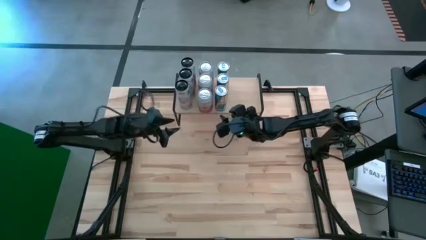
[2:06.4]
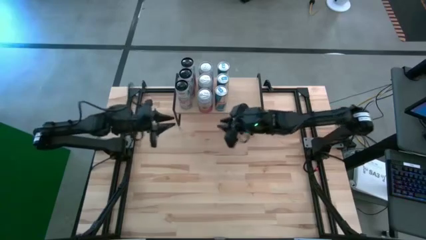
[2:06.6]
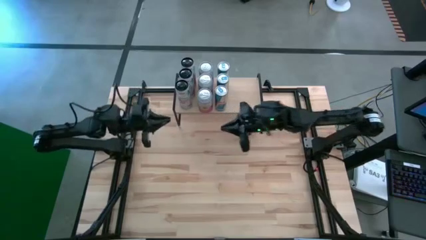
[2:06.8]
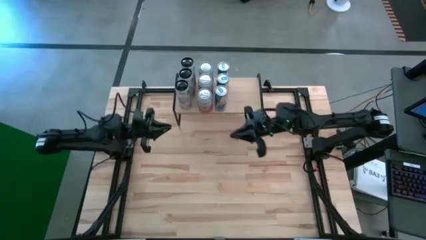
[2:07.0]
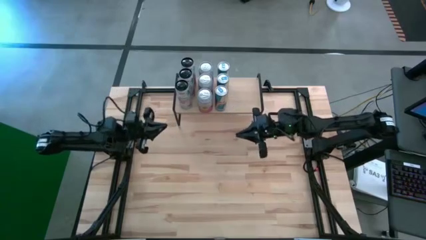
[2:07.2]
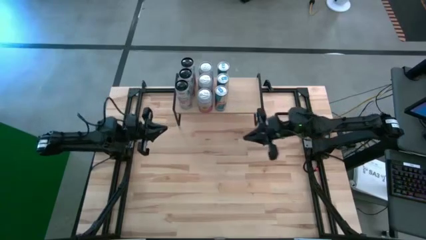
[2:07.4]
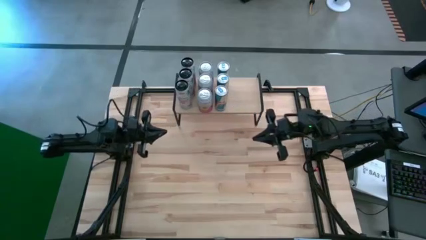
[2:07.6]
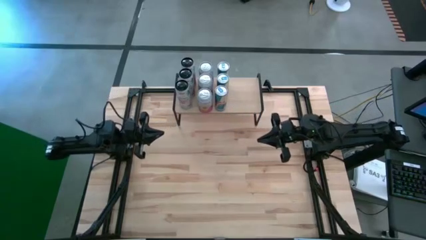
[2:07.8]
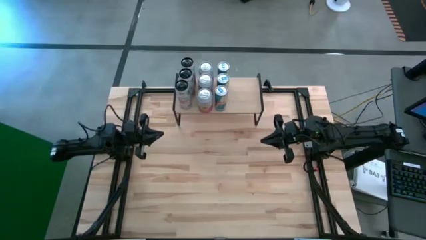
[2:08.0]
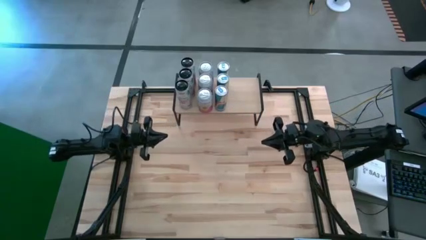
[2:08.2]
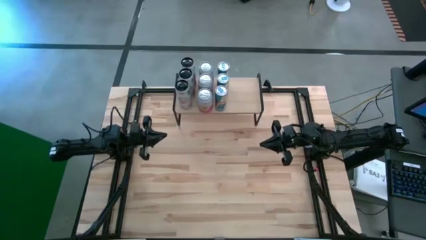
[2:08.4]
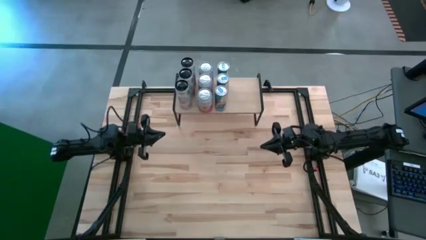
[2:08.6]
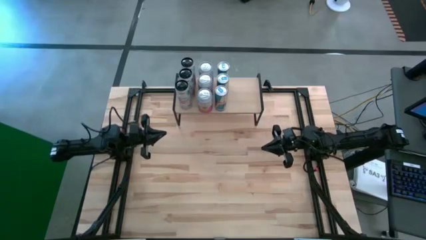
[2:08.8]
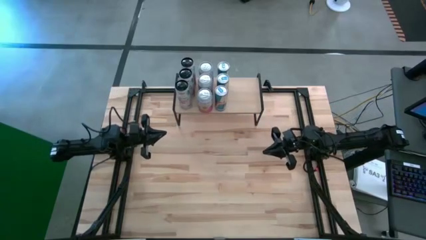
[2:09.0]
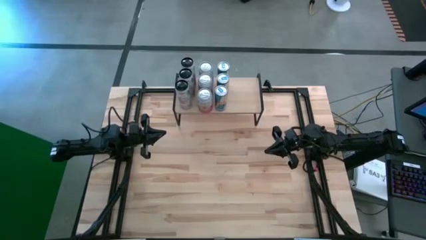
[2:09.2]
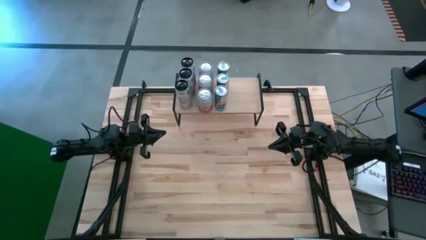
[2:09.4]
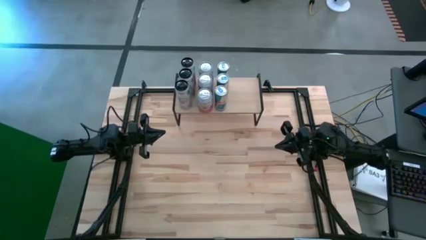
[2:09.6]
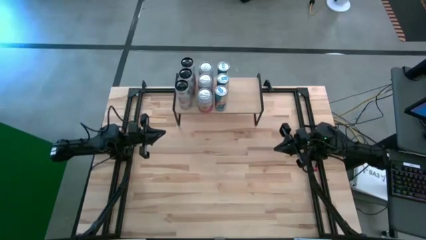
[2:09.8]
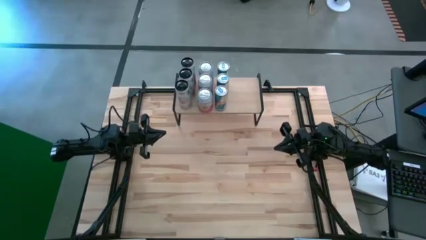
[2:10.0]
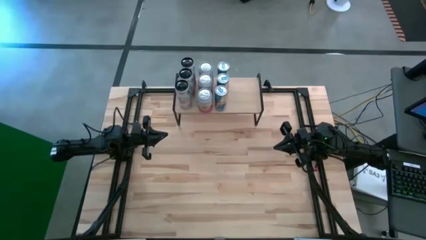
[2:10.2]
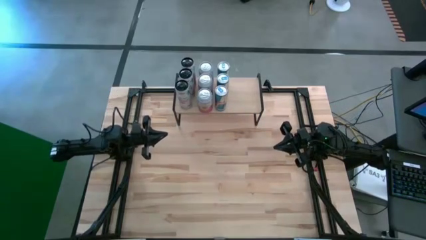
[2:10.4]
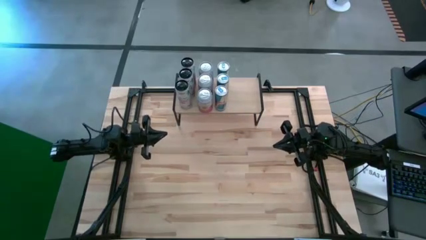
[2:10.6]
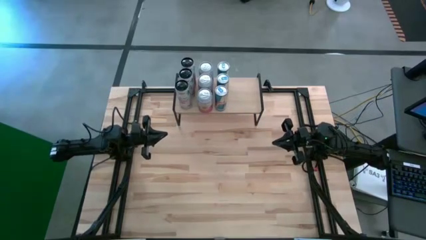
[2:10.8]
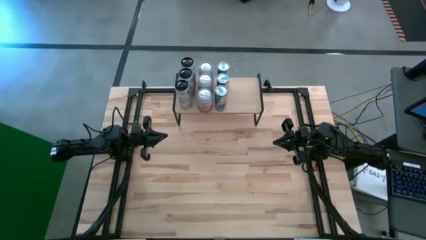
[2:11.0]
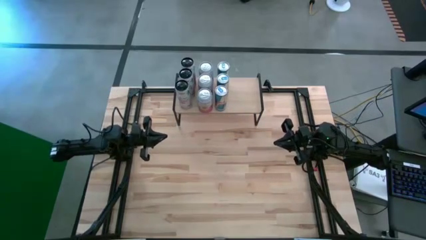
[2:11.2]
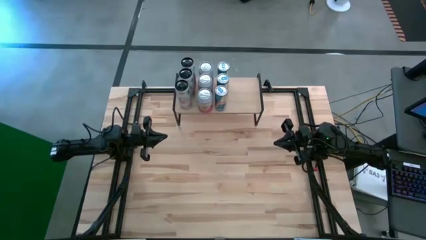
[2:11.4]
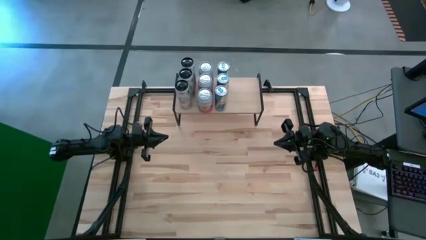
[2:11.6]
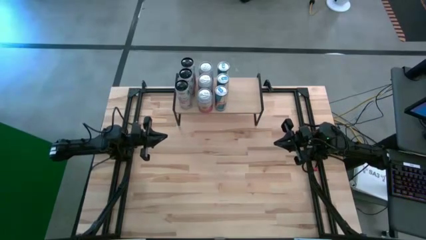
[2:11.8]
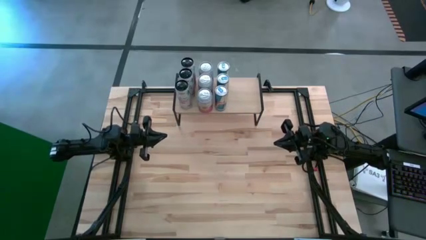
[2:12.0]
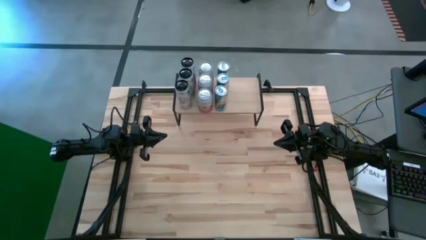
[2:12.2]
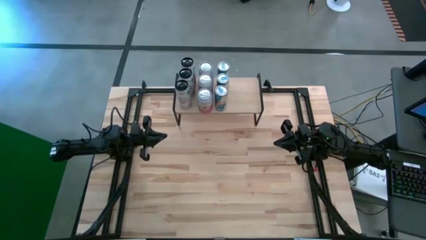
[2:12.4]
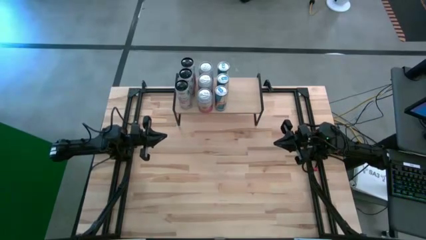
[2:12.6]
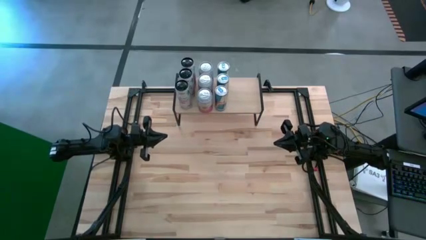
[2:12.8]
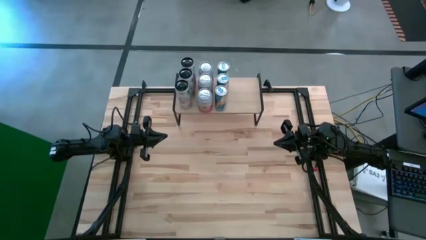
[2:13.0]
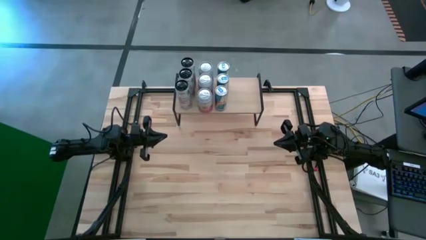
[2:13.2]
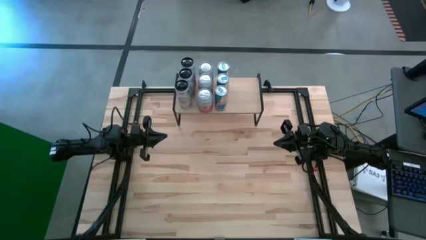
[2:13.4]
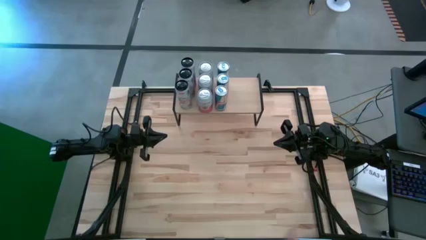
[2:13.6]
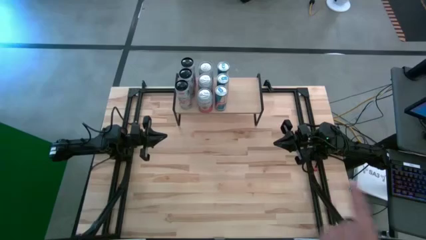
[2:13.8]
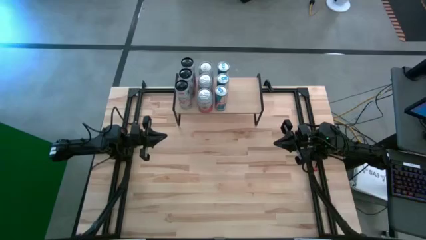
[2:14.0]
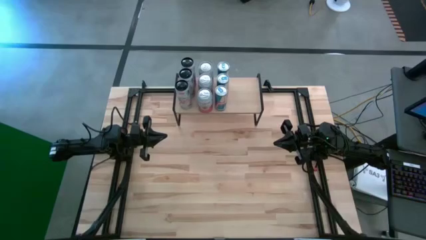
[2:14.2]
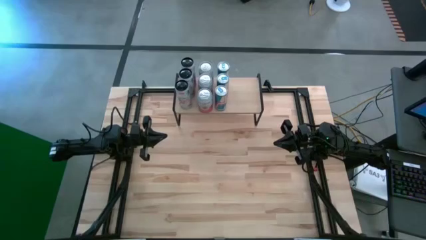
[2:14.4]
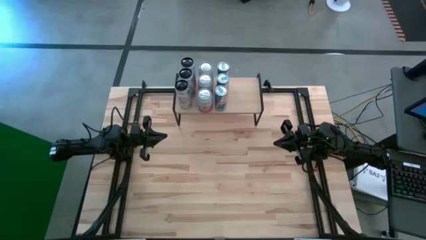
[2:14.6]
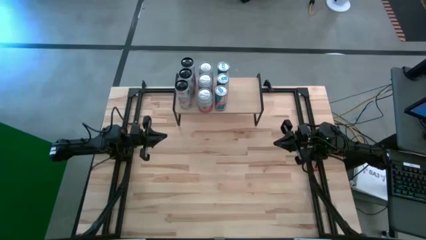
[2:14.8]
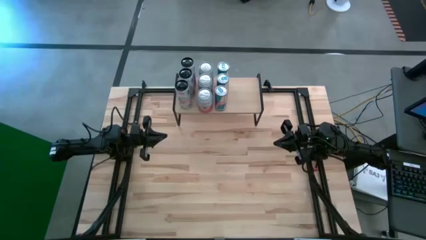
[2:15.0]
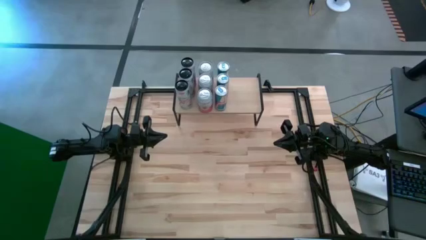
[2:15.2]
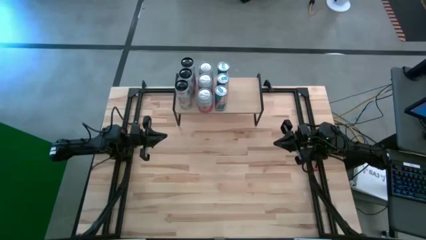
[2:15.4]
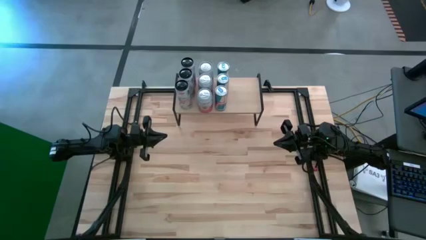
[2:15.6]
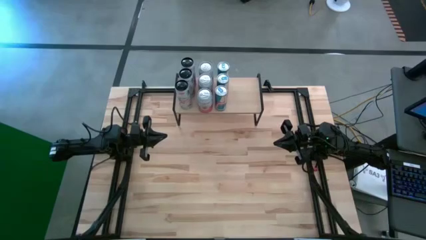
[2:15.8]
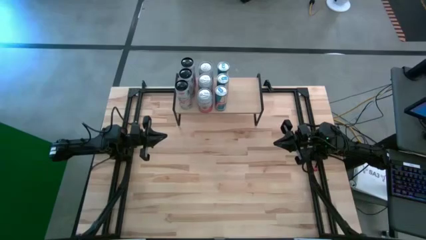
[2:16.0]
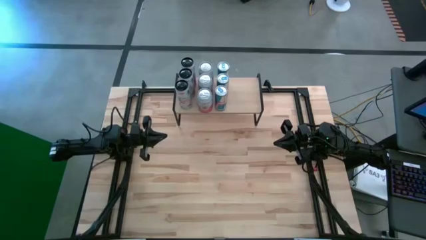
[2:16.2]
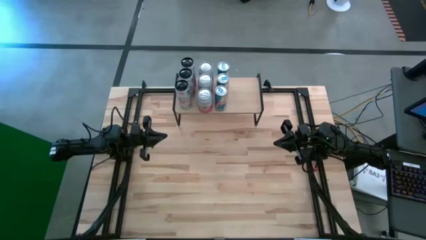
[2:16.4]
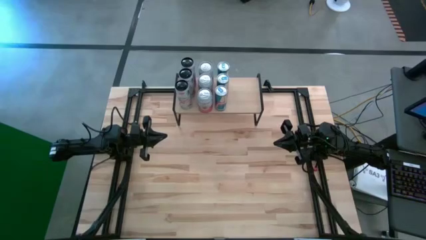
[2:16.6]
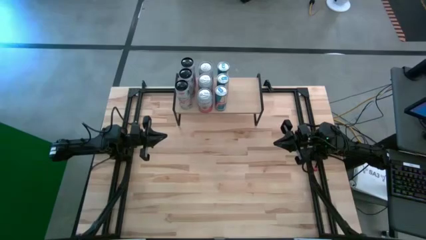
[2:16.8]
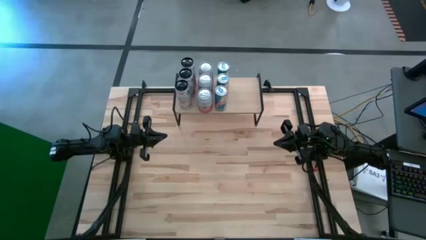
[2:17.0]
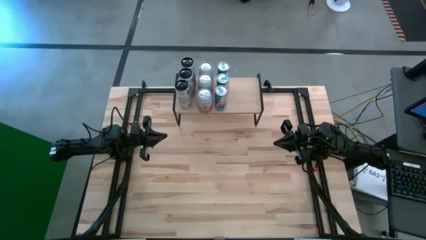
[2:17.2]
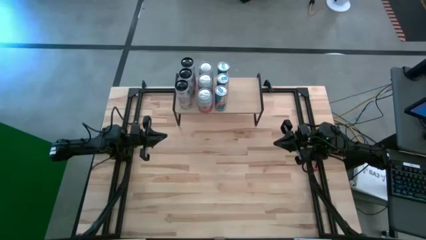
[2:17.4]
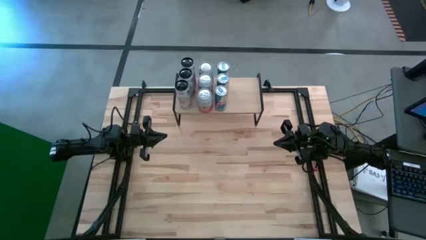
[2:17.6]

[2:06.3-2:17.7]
Task: Place canned beverage on shelf
Return to Home Position
